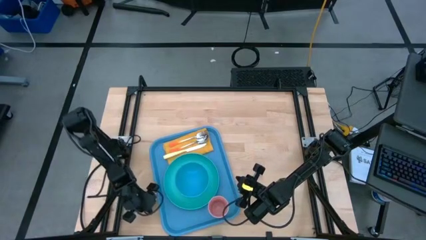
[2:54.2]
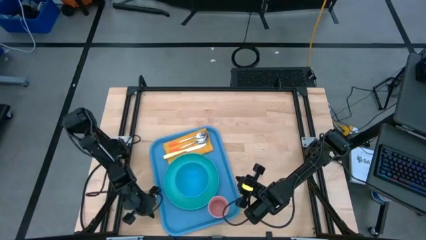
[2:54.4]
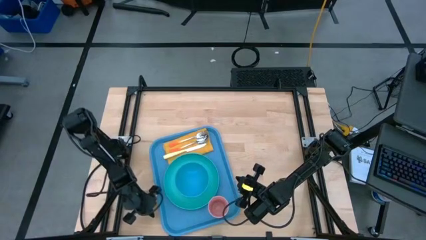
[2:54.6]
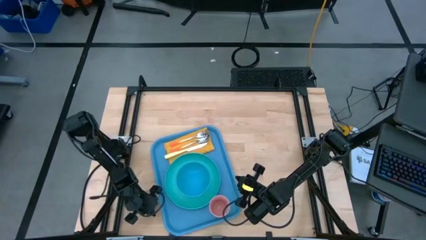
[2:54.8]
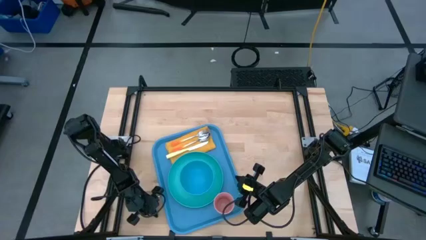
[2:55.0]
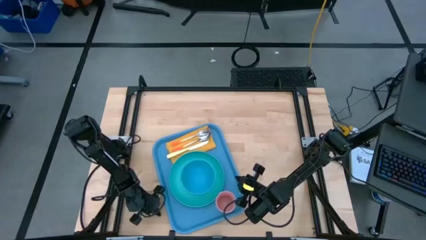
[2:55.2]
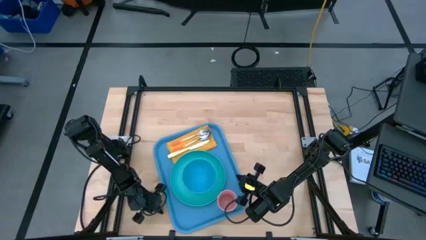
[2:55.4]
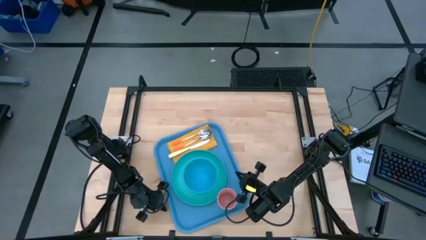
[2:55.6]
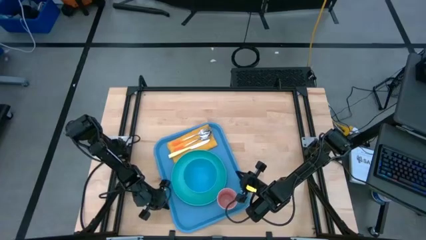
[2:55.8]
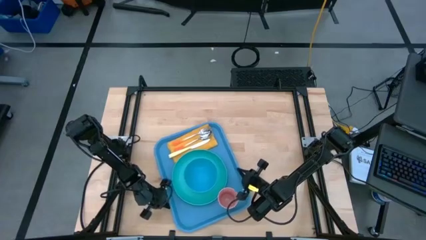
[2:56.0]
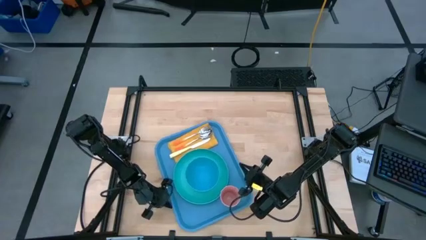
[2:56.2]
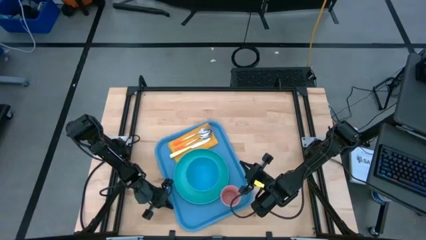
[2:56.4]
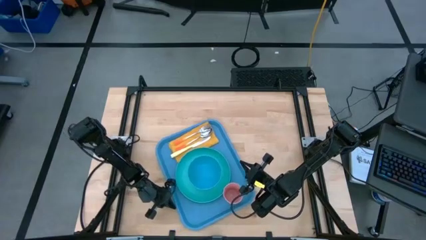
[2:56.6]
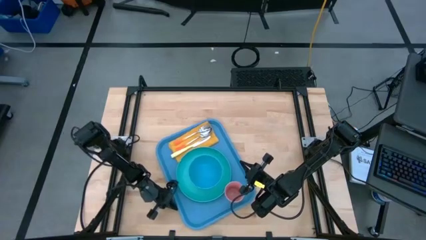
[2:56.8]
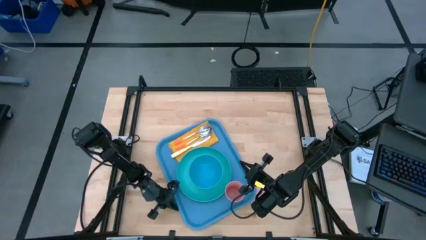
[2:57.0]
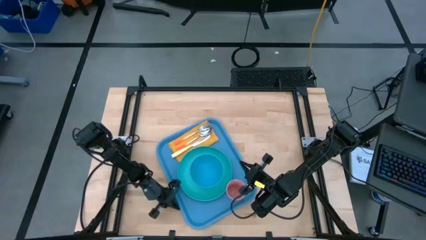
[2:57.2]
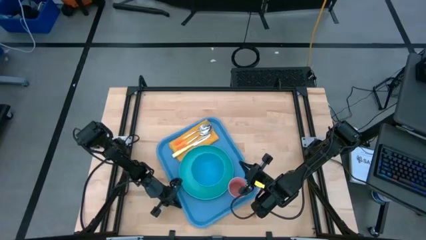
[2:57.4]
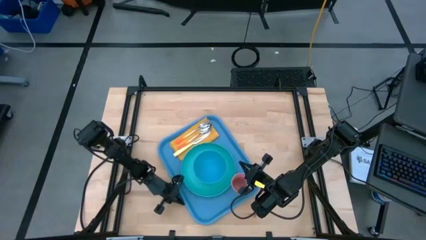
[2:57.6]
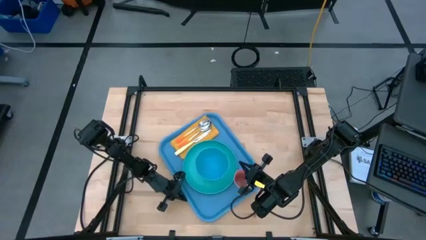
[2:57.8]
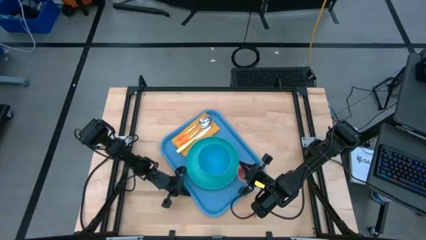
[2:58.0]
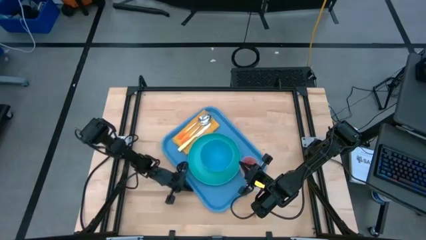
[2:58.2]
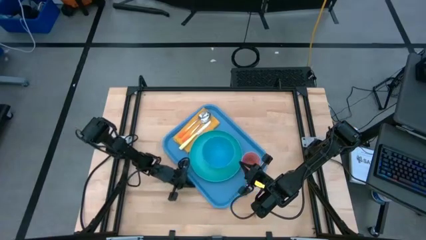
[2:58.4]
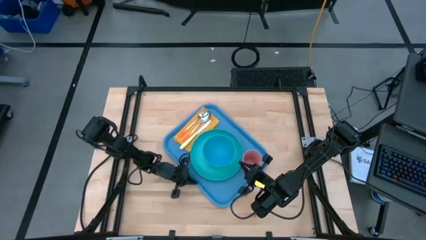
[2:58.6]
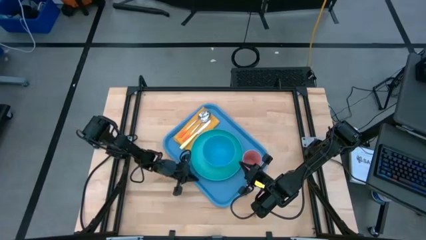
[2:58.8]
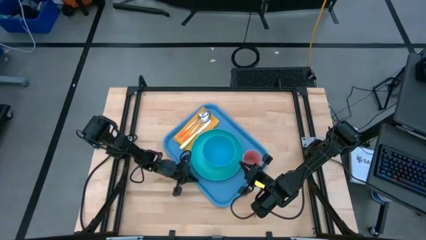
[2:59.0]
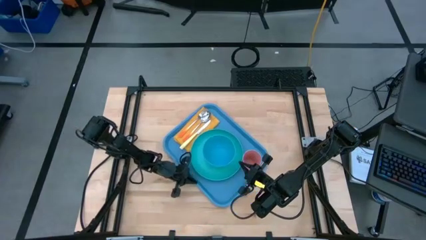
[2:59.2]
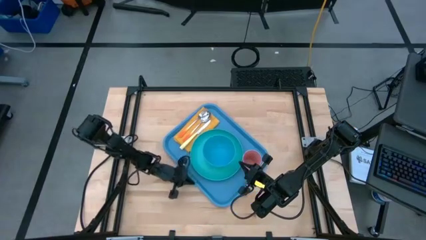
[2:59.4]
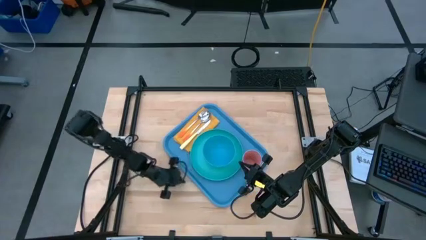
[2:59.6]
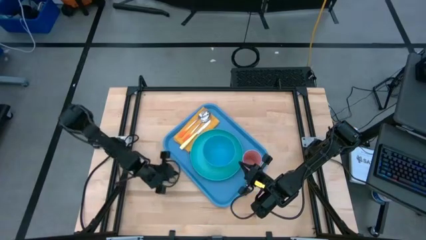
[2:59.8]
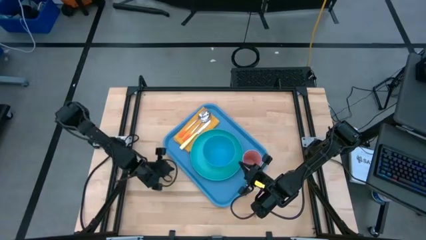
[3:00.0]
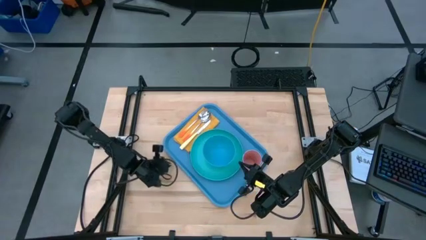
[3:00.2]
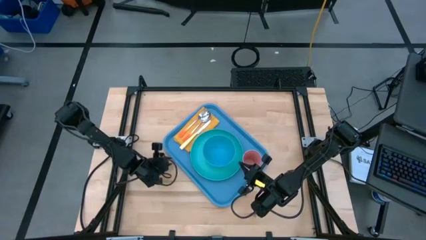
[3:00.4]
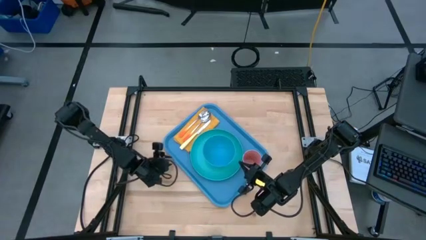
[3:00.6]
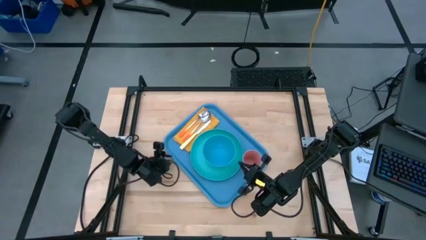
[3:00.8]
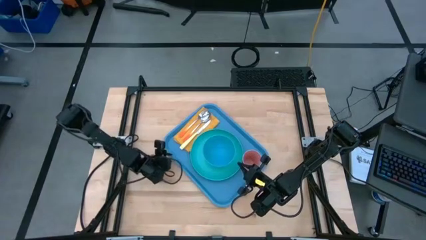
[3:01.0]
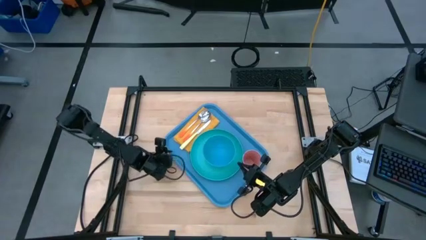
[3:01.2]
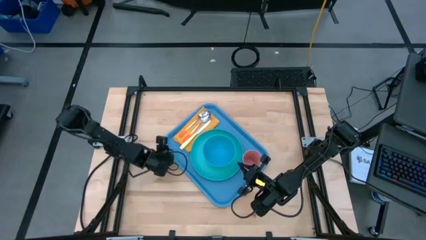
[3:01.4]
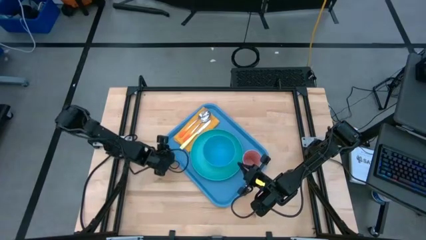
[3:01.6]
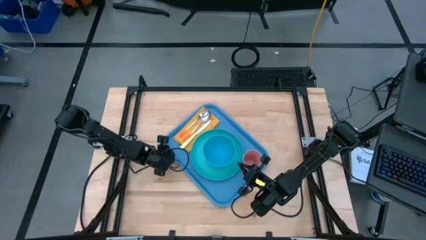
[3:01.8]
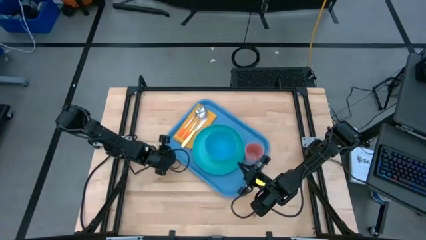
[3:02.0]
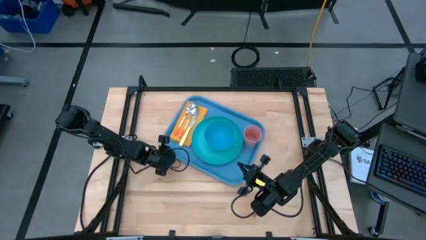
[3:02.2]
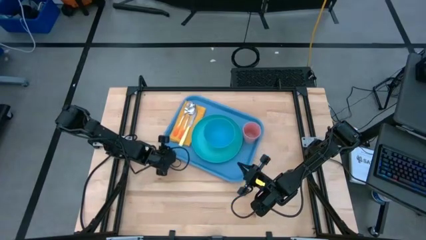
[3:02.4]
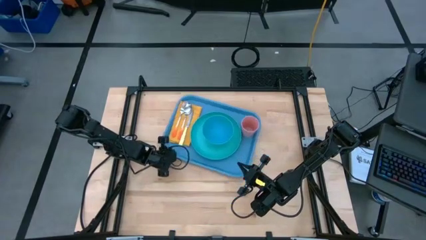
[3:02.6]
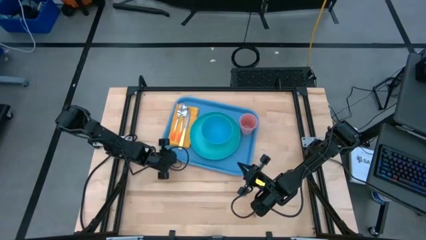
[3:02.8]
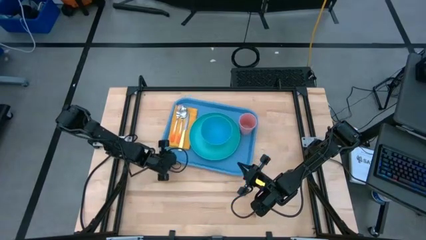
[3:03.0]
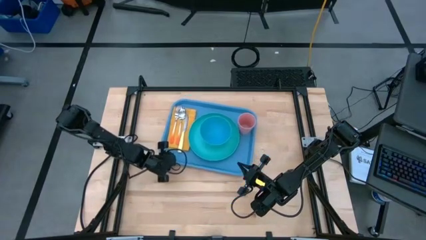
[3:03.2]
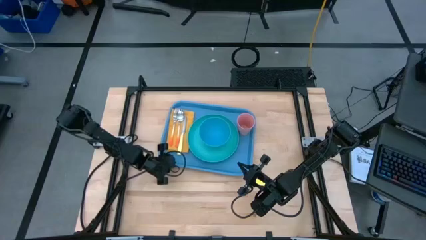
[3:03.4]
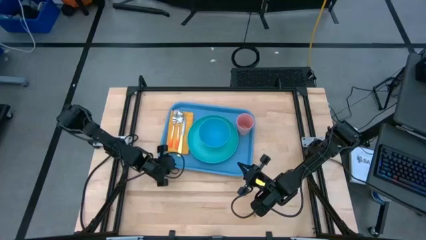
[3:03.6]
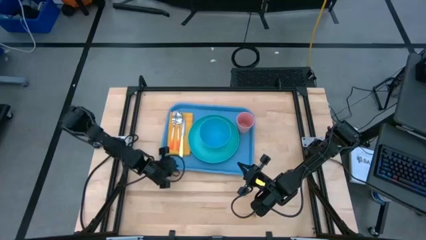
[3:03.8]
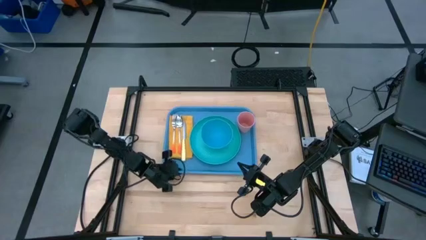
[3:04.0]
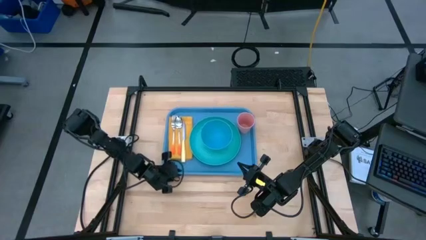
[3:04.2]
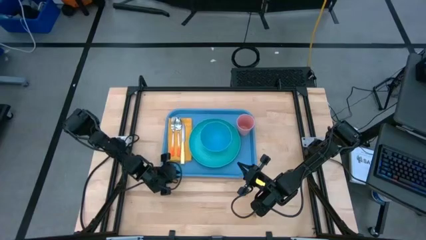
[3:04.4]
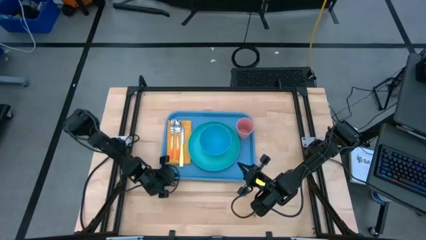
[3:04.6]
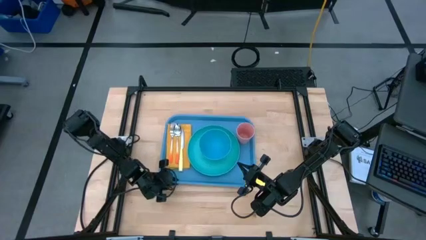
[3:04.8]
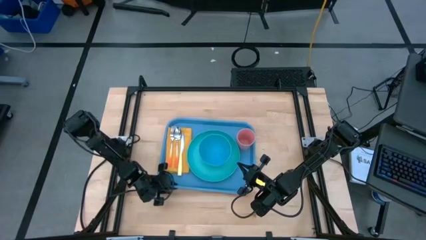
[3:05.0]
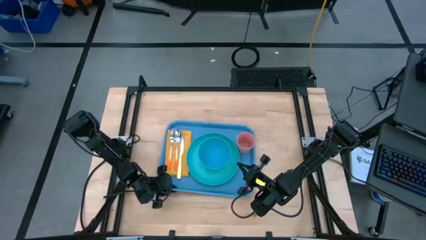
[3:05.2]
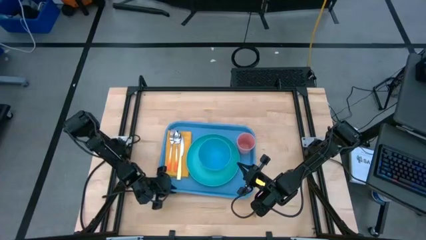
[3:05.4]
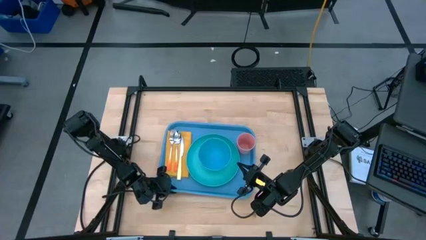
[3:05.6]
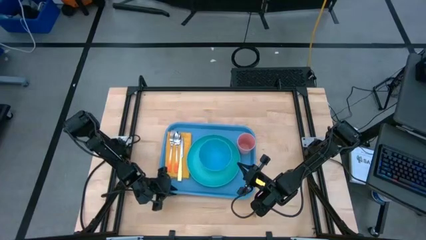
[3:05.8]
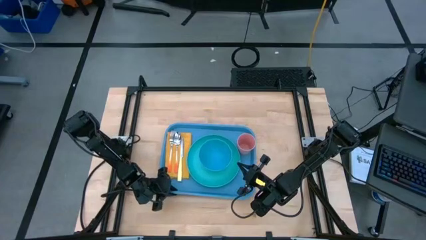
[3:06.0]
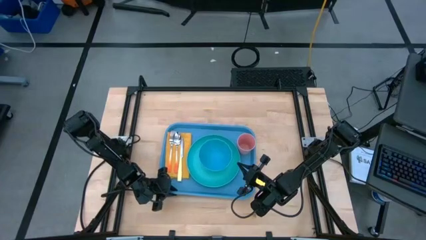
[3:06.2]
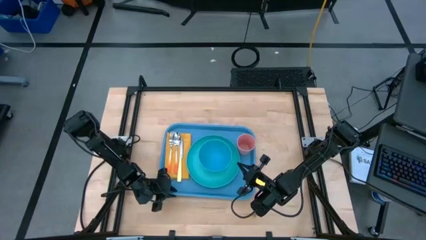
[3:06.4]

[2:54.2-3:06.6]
Task: Set up tray
Move the blue serving tray to the center of the table
